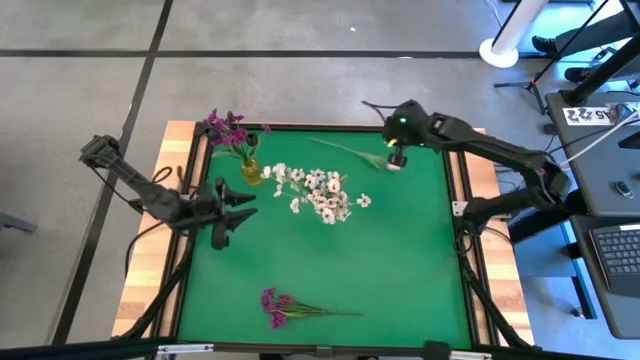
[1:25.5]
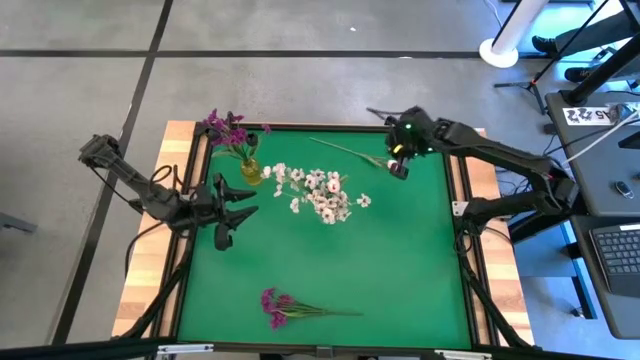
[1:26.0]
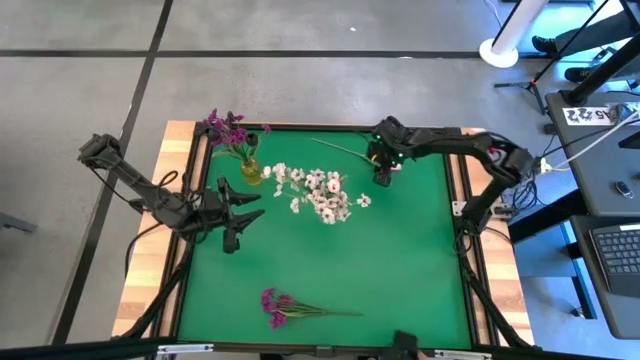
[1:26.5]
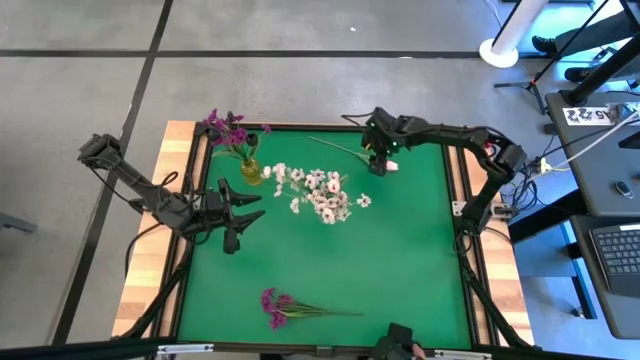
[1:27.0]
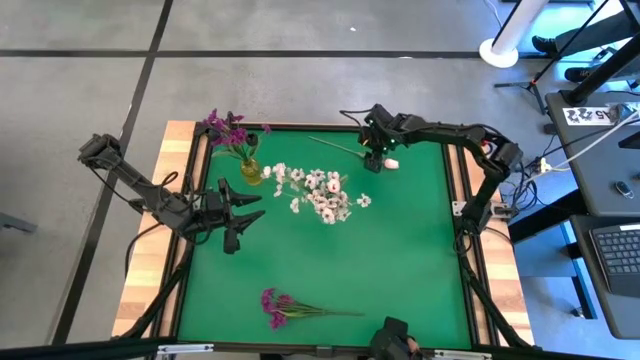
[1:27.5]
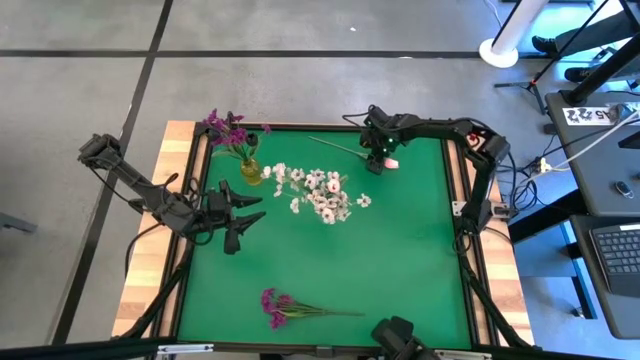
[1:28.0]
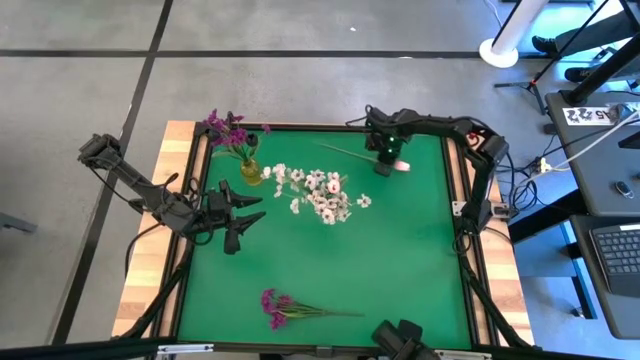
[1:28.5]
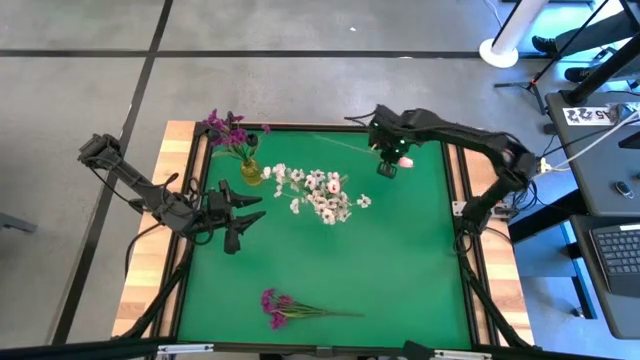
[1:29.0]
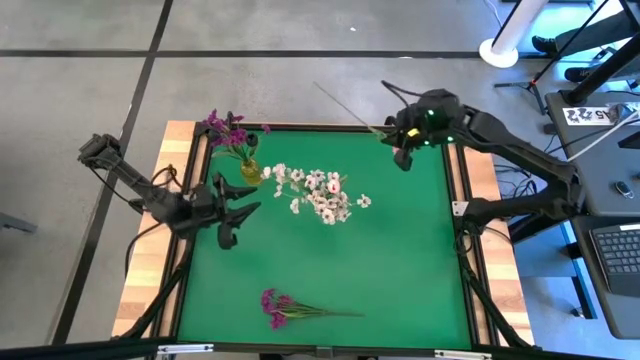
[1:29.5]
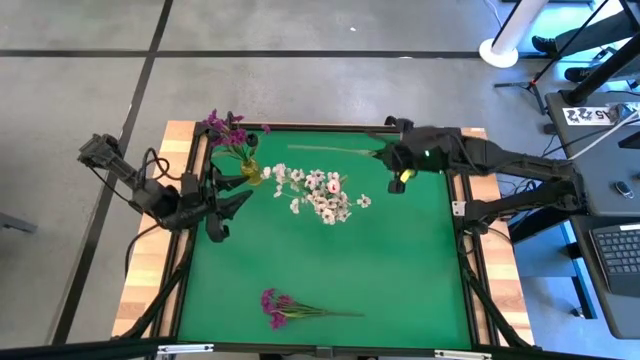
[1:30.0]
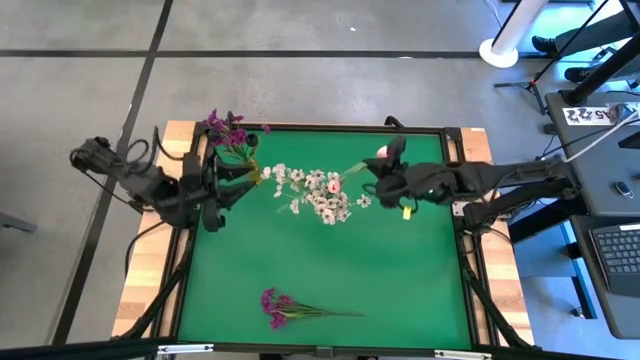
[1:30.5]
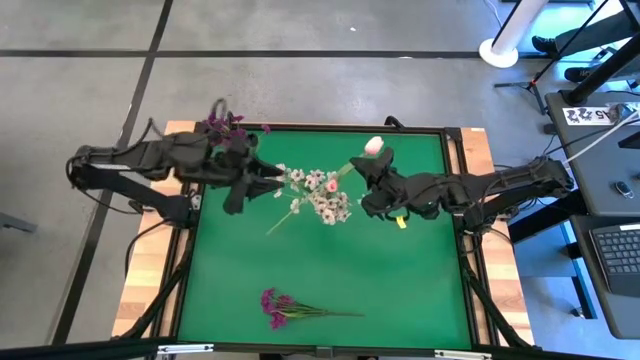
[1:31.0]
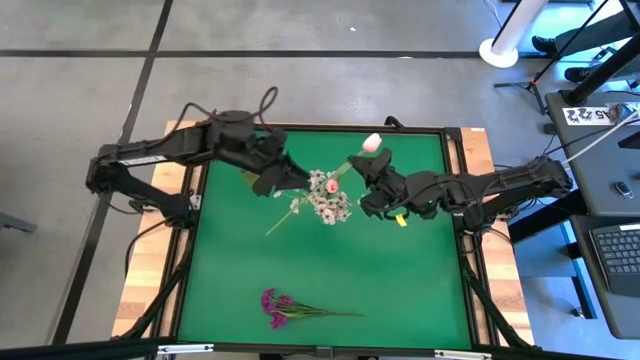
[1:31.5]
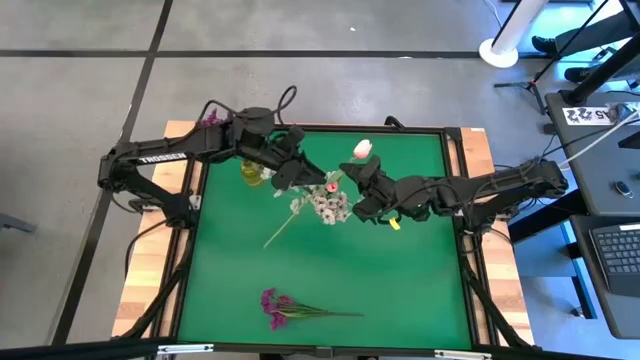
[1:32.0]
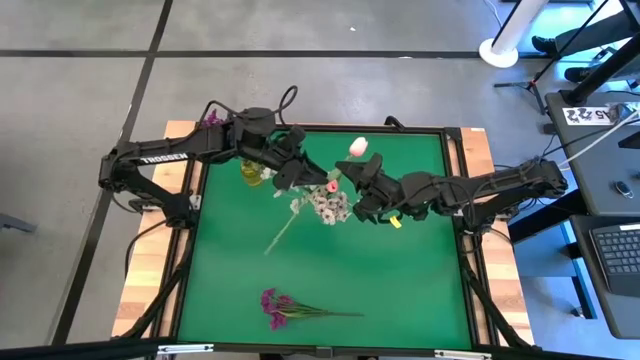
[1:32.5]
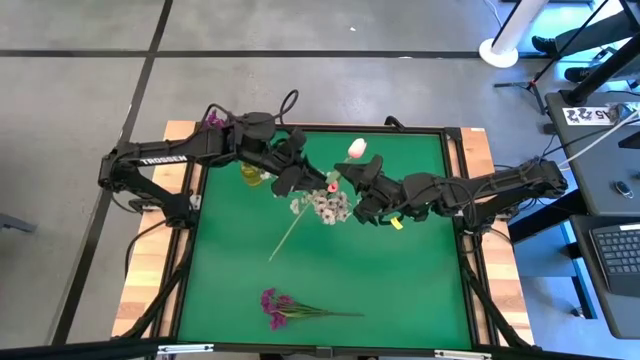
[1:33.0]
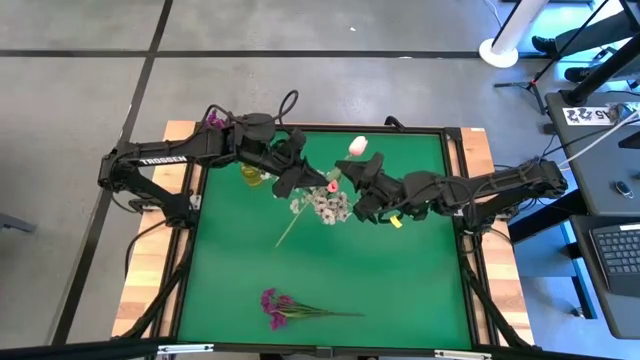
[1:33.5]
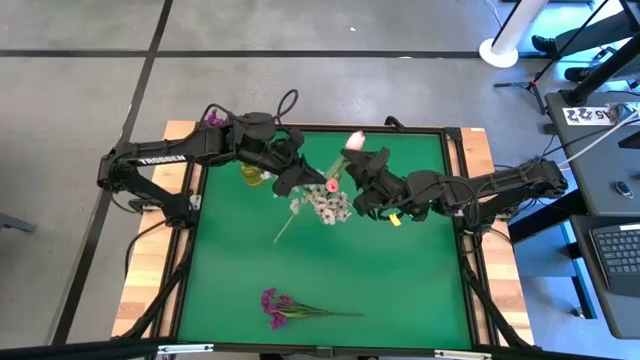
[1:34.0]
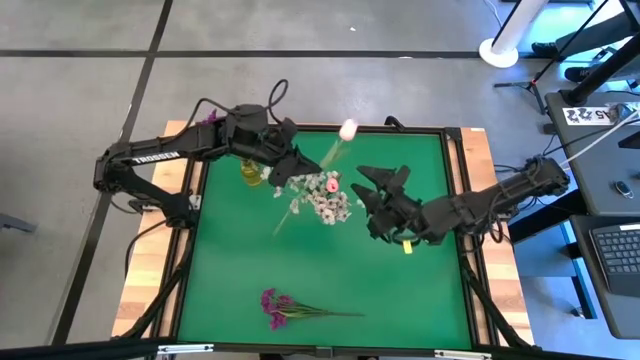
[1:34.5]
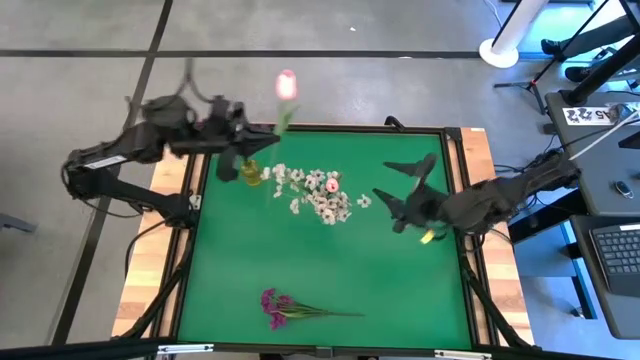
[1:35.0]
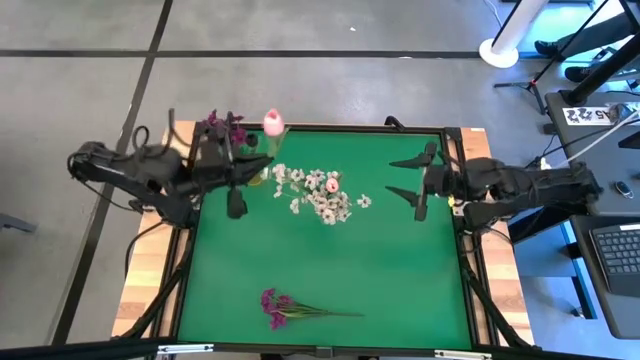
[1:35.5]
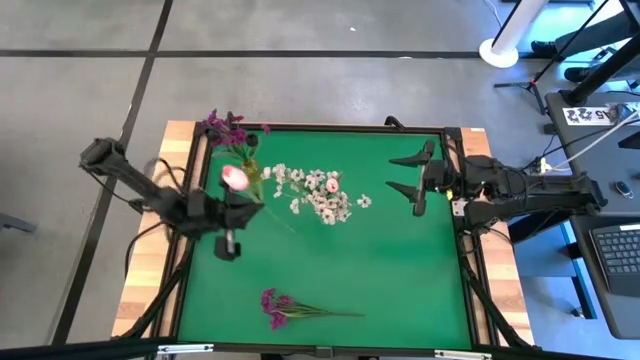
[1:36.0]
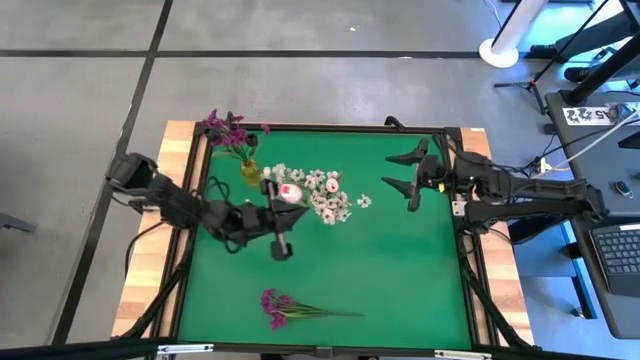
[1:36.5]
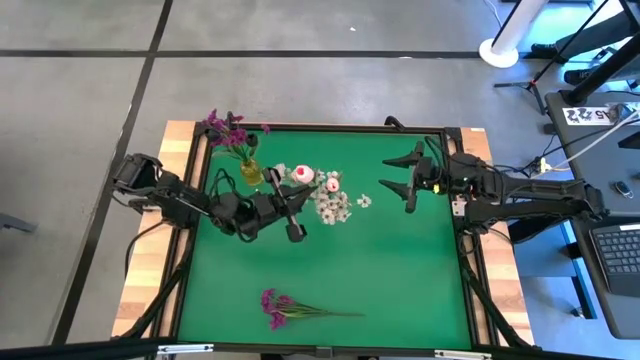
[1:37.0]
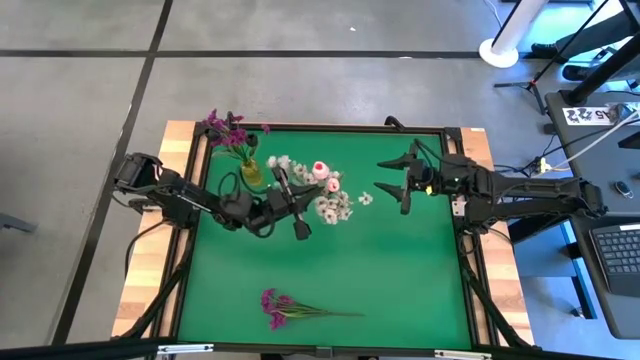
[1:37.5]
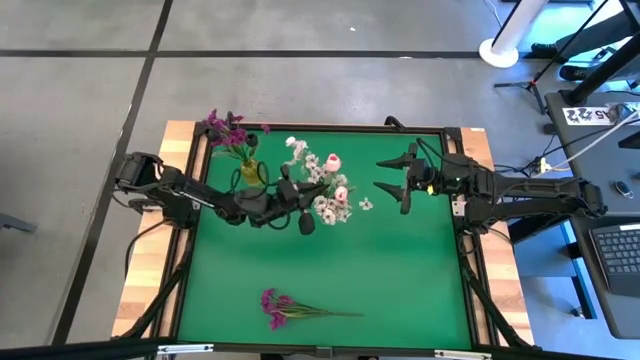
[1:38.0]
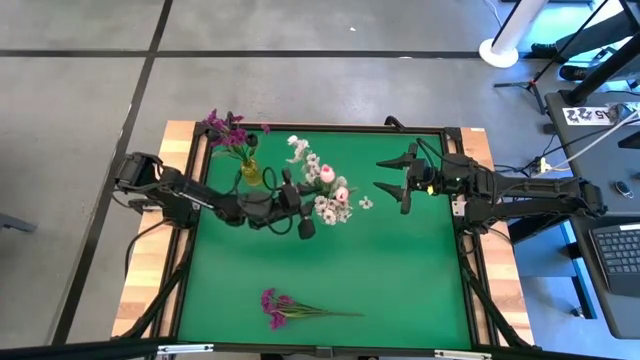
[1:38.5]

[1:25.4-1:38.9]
Task: Sort flowers into vase by color
Put the pink flower into the transparent vase

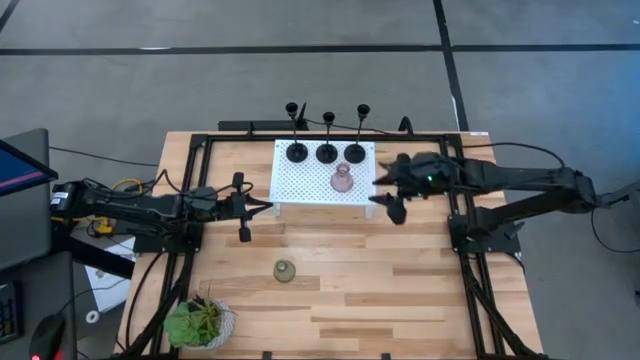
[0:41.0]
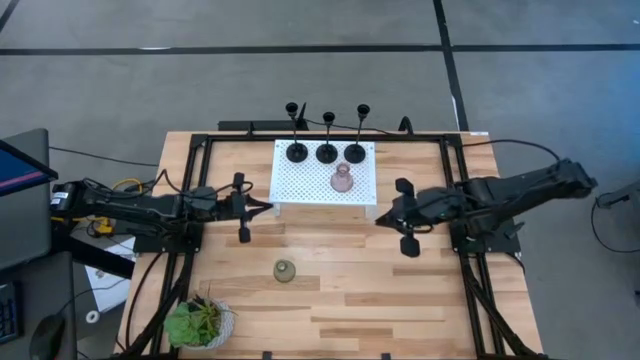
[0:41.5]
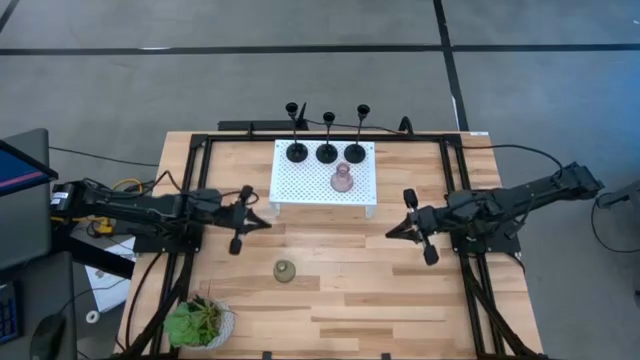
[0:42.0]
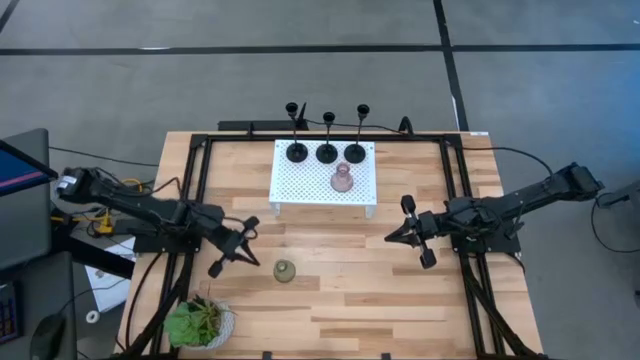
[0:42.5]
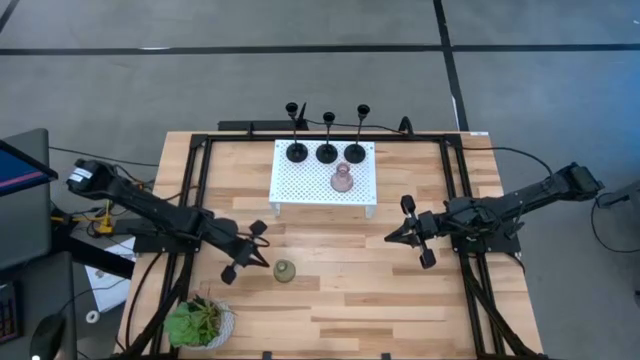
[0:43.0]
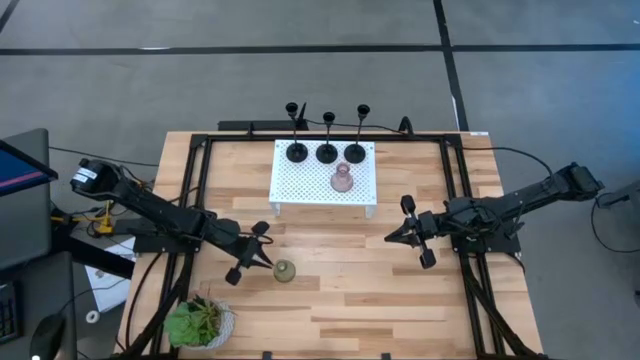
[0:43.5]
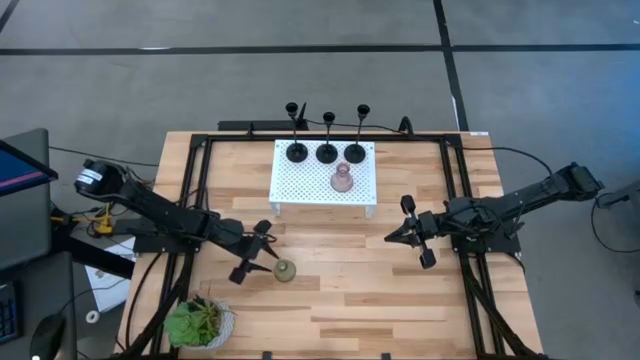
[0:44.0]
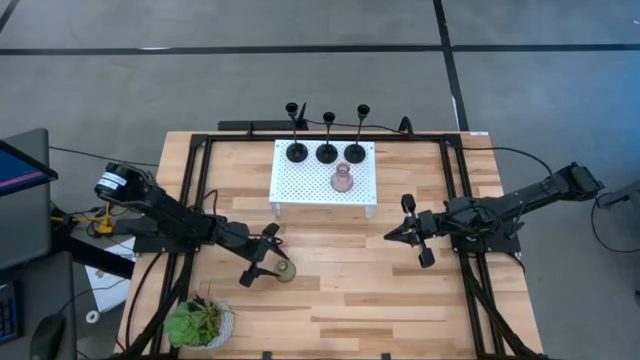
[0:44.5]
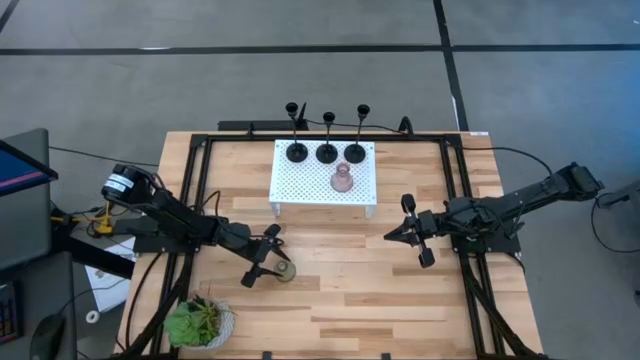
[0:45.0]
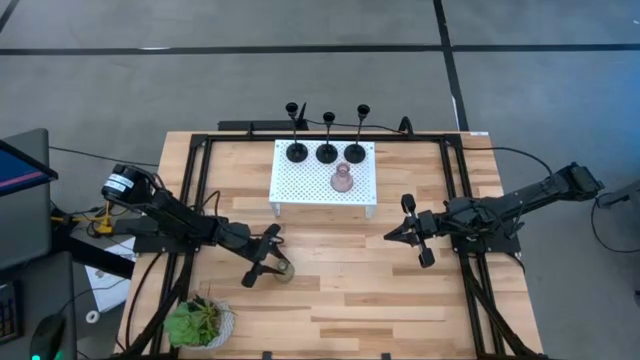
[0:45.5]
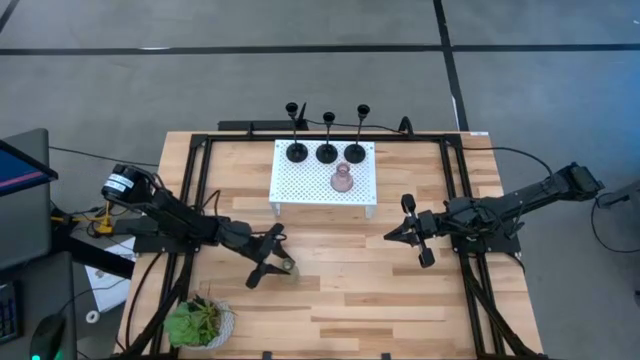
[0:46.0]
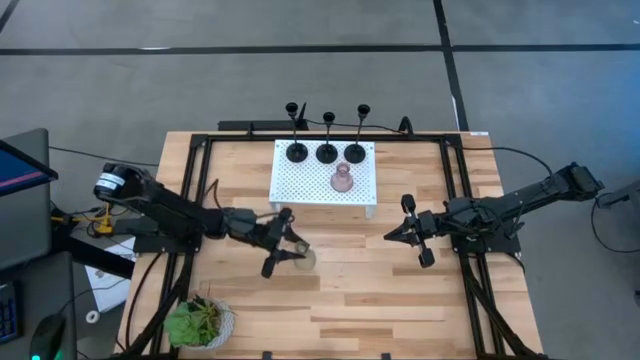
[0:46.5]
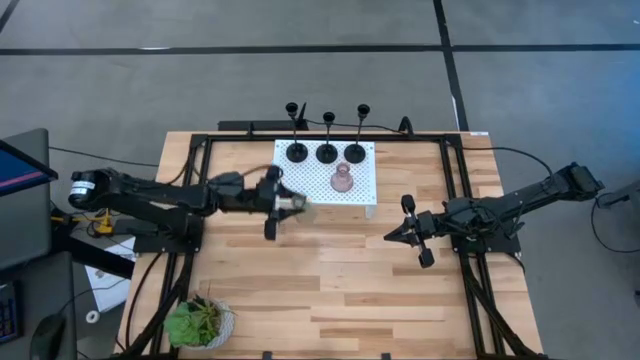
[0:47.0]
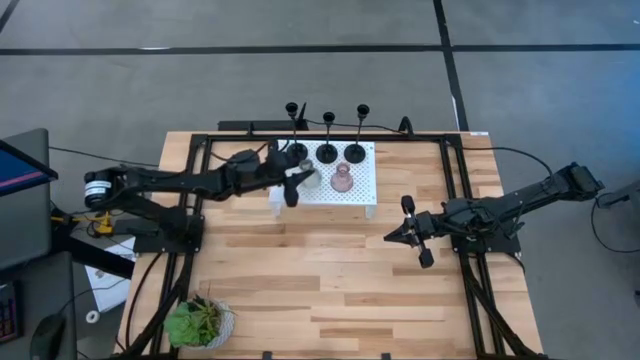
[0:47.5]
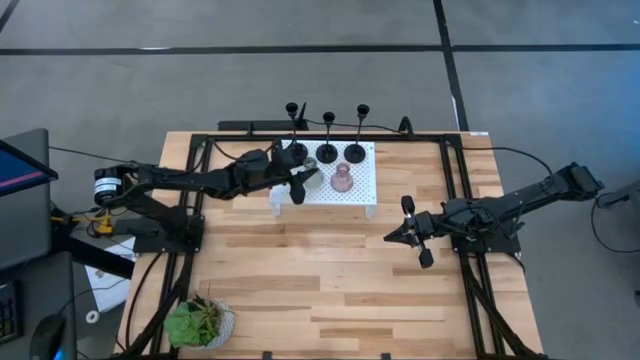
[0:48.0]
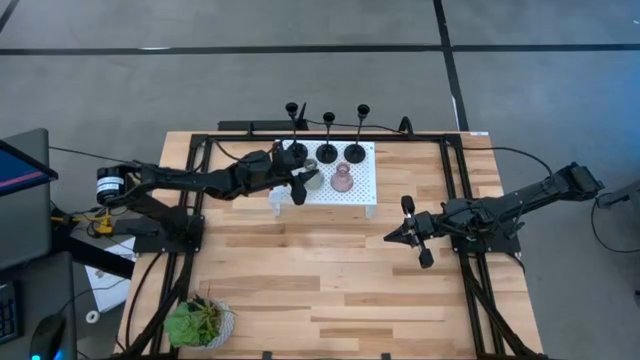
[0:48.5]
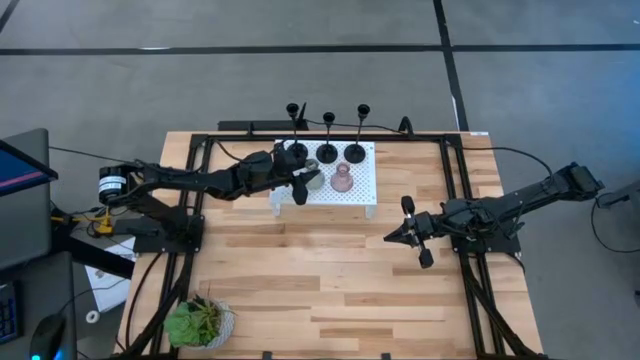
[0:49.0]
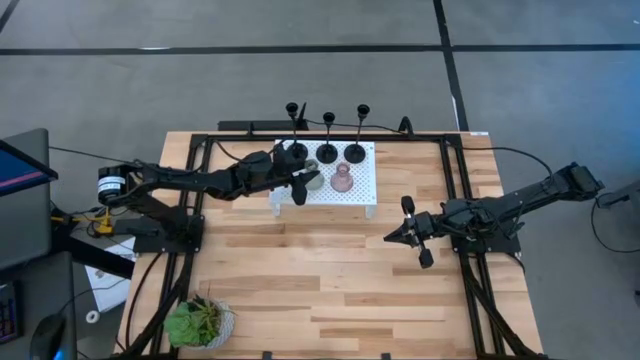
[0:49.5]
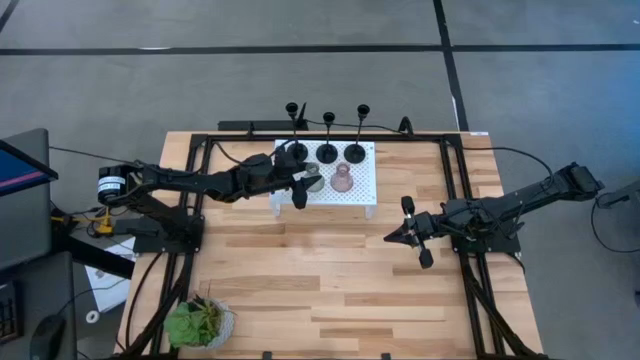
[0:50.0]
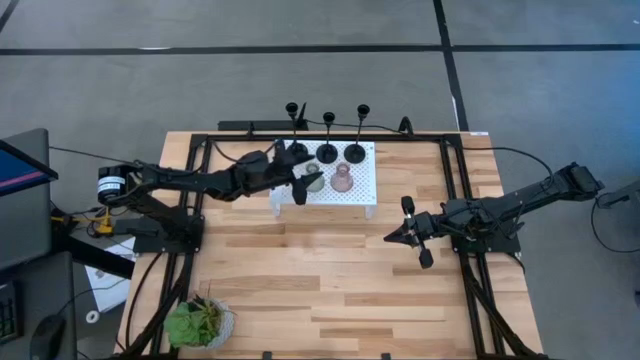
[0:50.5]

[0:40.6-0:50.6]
Task: Pick & Place candle stick holders
Put the green glass candle holder on the shelf
